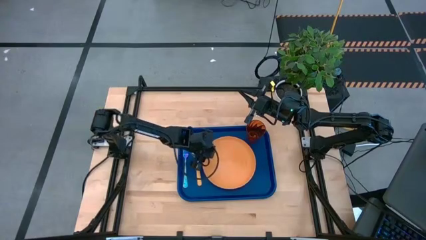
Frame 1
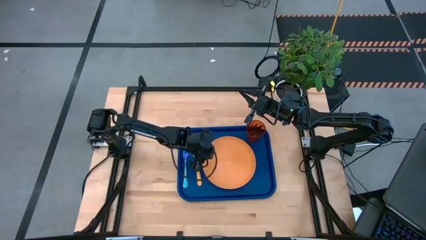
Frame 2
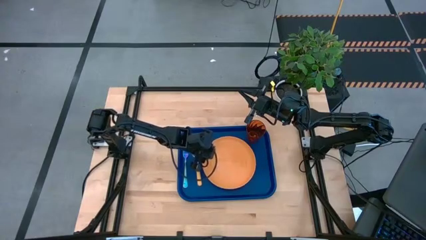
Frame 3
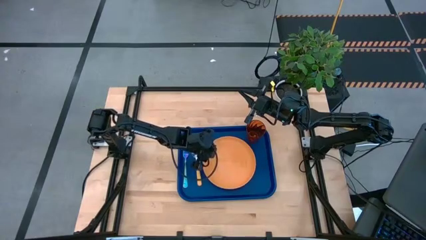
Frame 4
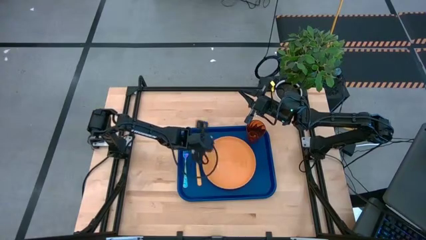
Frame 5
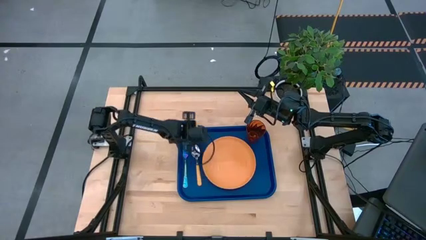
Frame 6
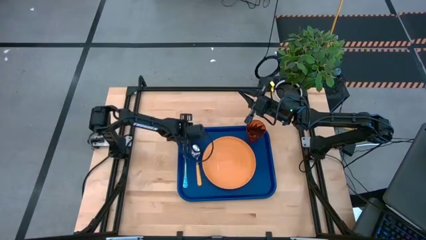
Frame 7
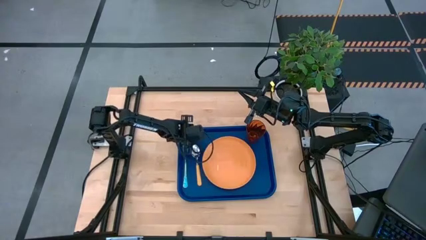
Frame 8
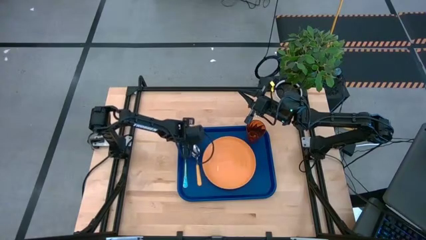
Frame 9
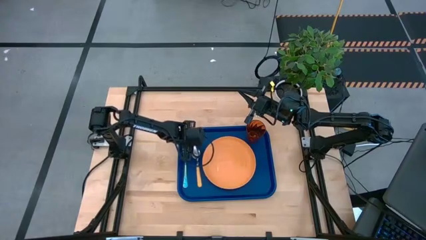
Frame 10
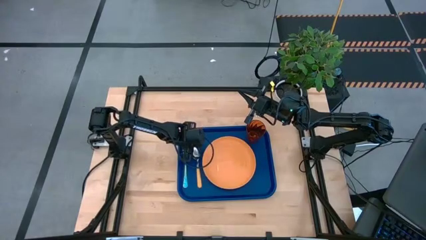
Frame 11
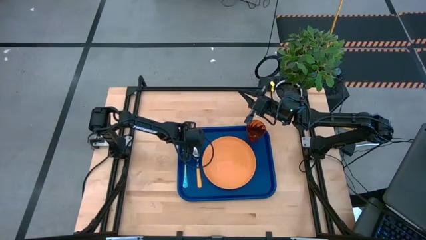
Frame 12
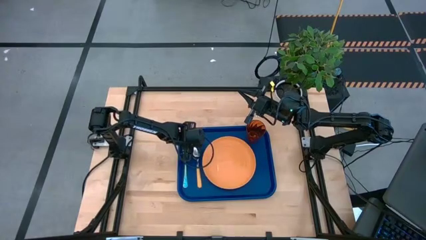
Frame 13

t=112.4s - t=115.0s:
Task: Pick and place plate/cup/fork/spoon on tray
Adjust the orange spoon on the blue tray

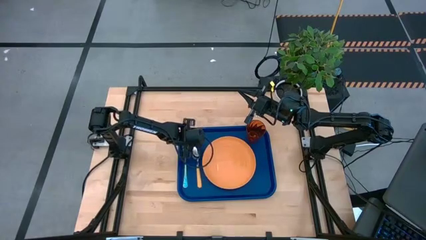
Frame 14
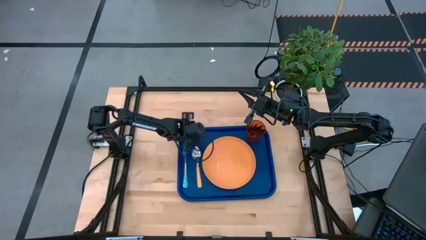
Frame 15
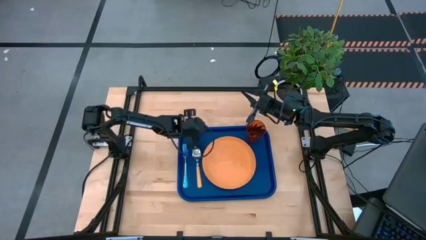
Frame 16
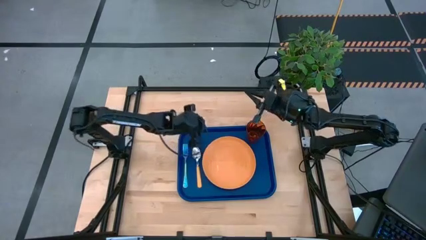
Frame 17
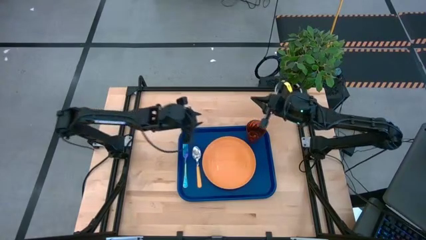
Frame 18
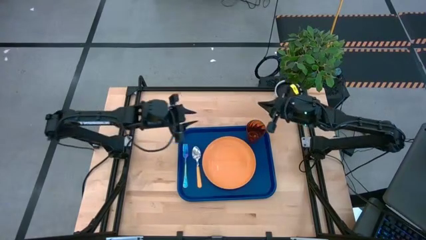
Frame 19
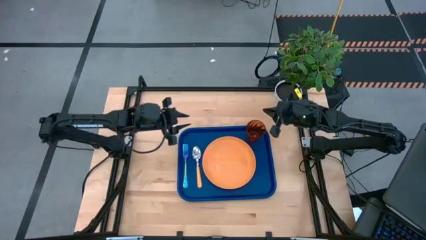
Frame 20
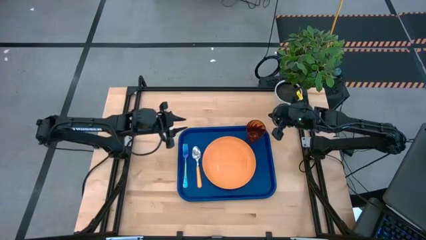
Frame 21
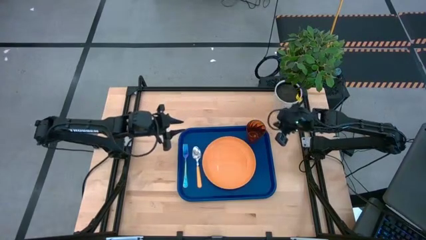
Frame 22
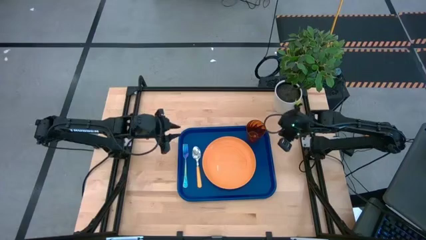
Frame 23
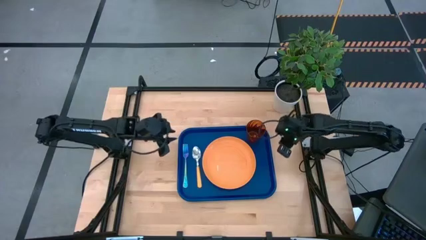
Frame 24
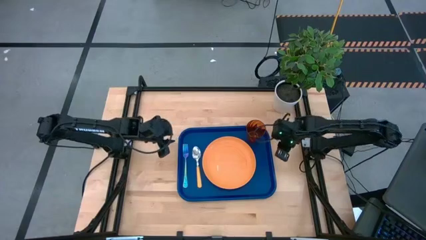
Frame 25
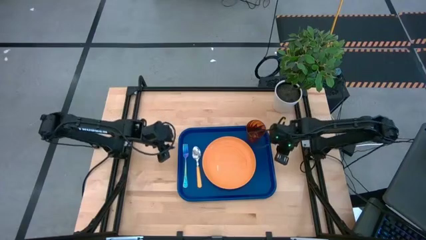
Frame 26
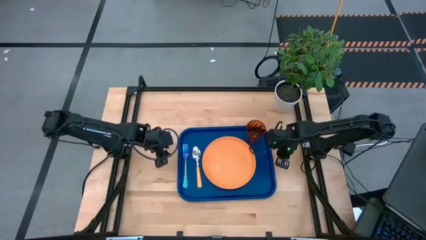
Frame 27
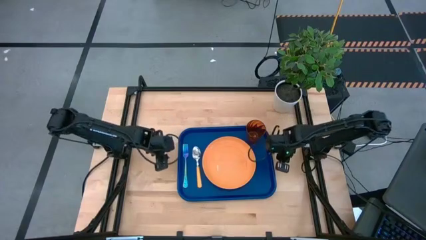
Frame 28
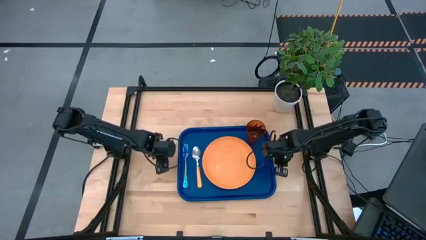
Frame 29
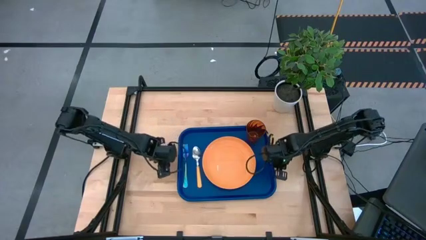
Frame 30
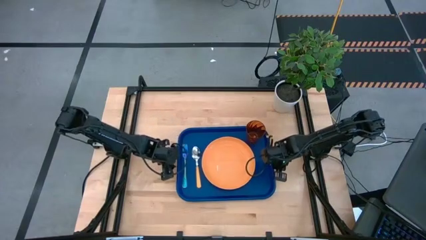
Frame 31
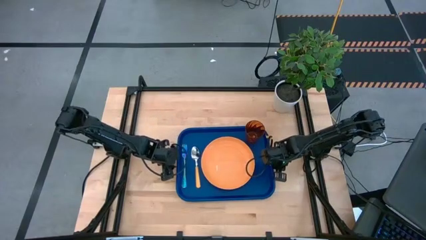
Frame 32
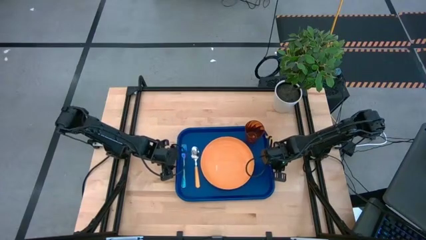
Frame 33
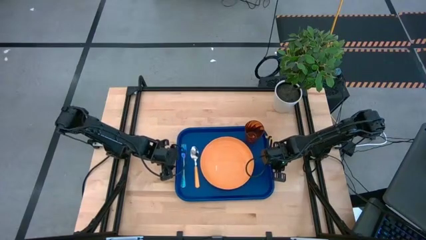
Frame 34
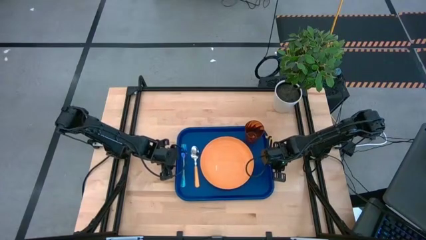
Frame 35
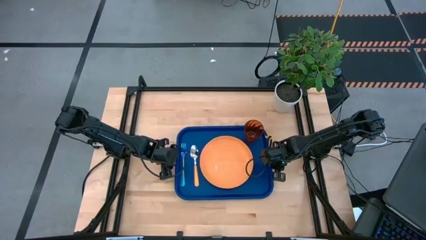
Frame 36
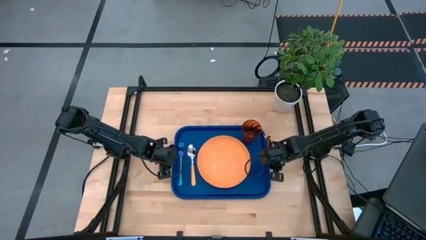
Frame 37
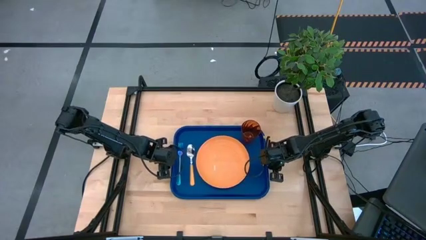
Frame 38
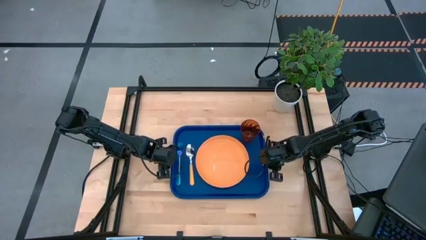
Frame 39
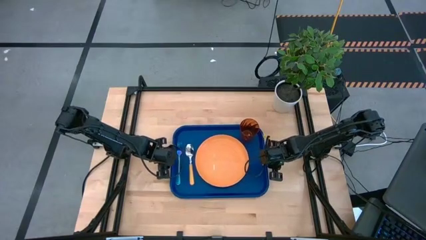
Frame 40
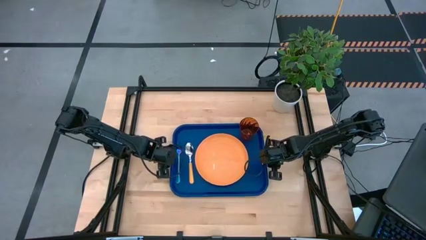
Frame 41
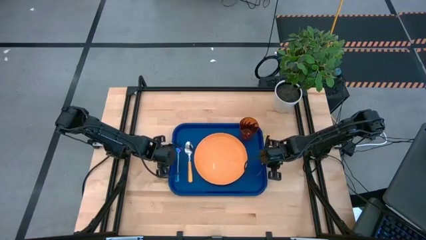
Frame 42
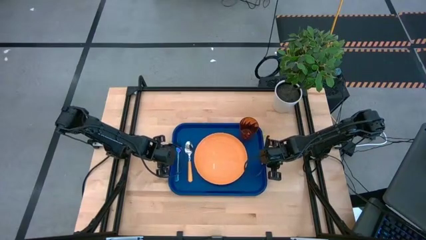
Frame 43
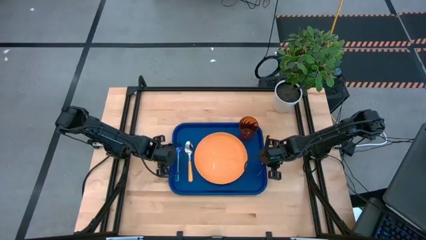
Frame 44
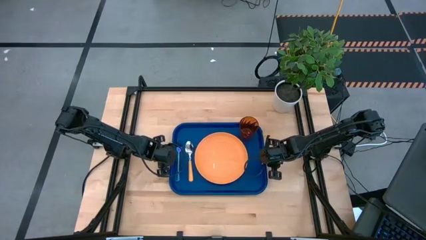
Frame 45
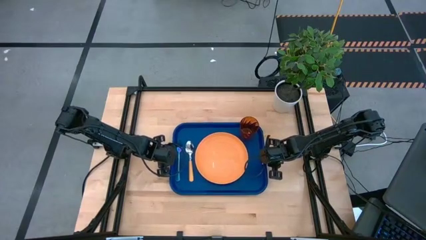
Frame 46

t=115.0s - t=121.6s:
Adjust the blue tray

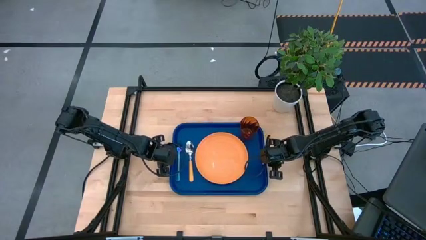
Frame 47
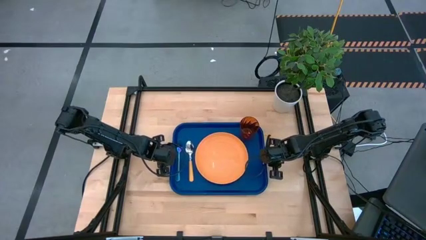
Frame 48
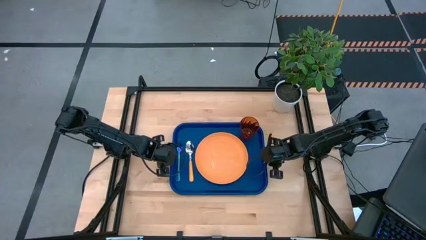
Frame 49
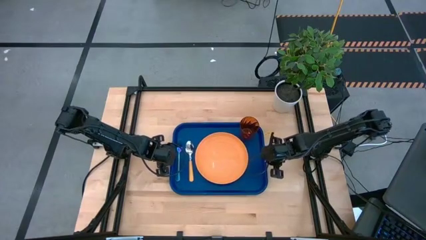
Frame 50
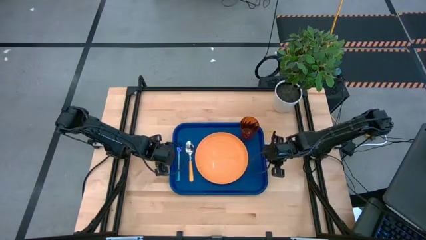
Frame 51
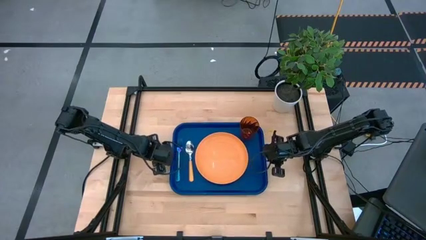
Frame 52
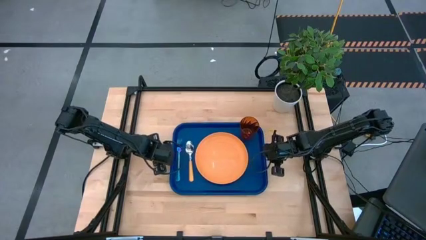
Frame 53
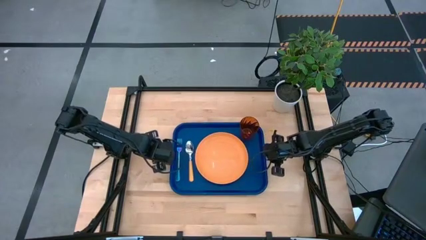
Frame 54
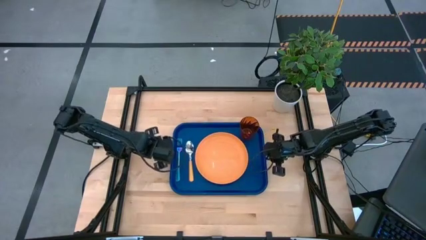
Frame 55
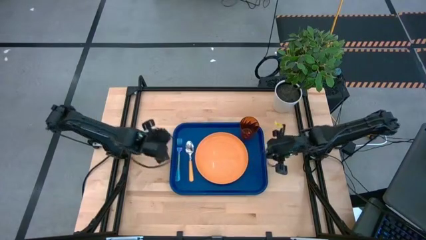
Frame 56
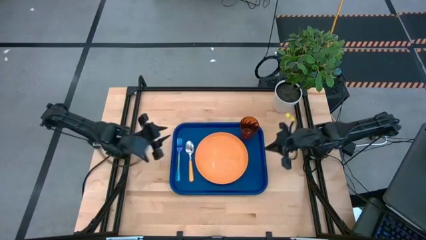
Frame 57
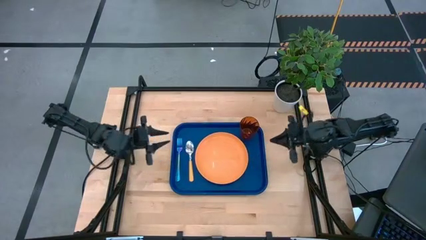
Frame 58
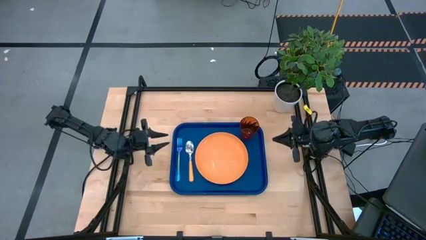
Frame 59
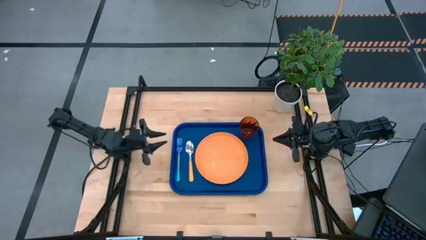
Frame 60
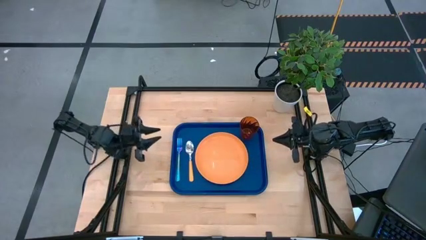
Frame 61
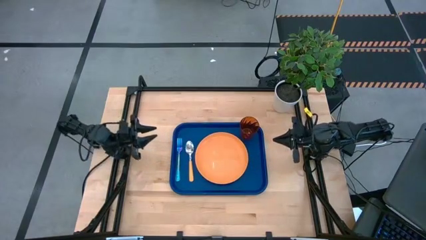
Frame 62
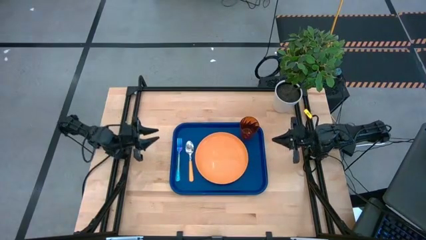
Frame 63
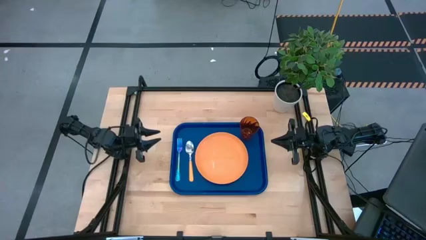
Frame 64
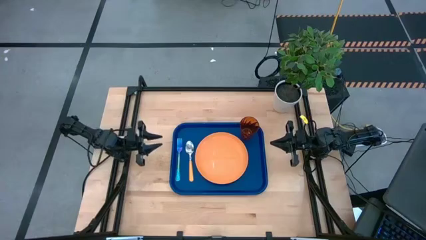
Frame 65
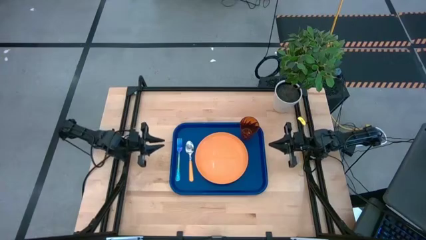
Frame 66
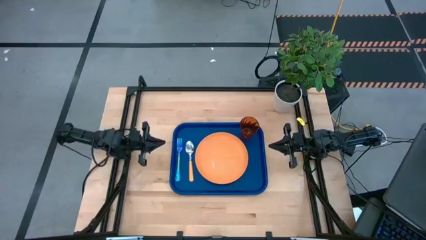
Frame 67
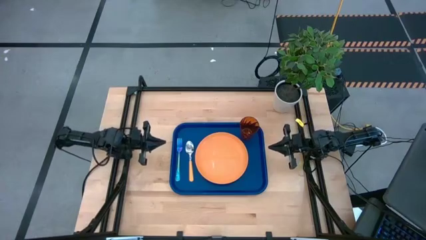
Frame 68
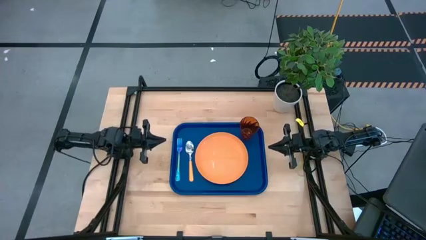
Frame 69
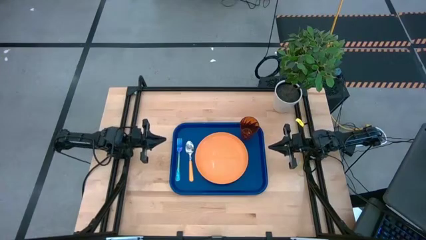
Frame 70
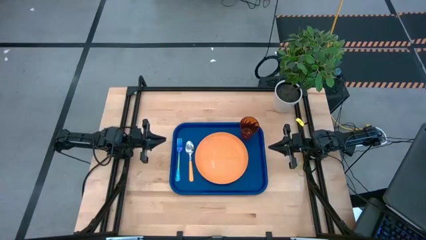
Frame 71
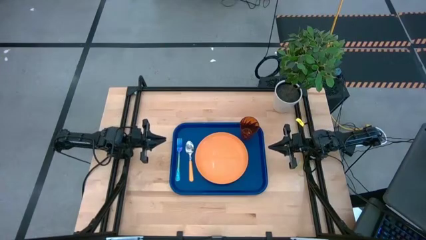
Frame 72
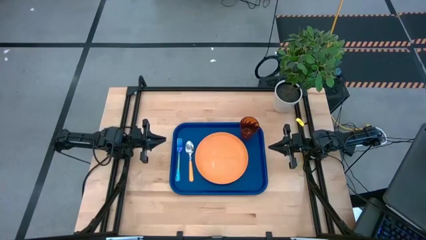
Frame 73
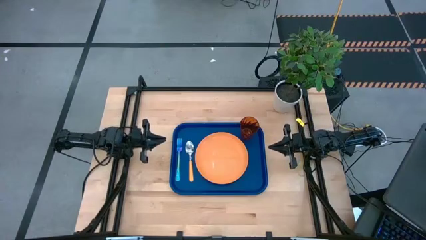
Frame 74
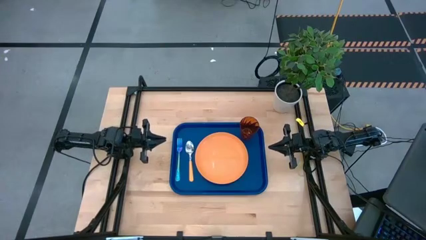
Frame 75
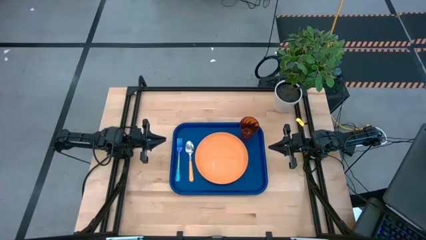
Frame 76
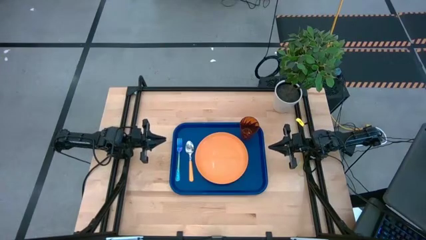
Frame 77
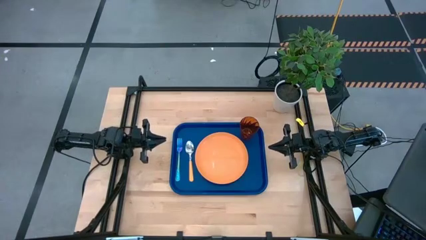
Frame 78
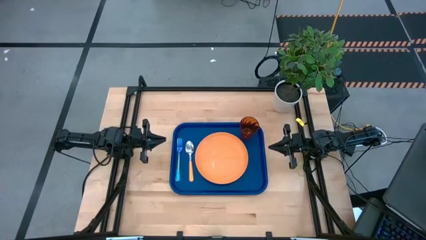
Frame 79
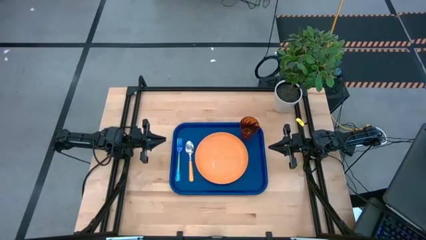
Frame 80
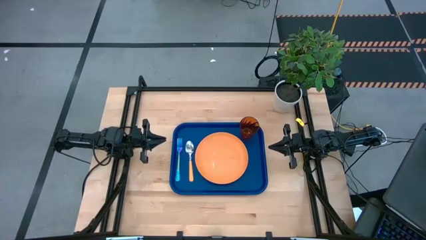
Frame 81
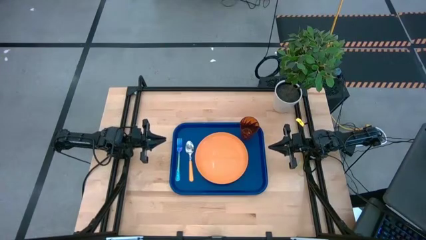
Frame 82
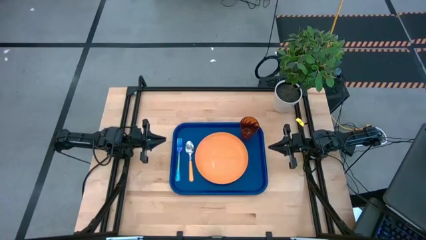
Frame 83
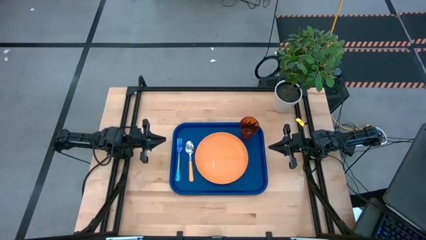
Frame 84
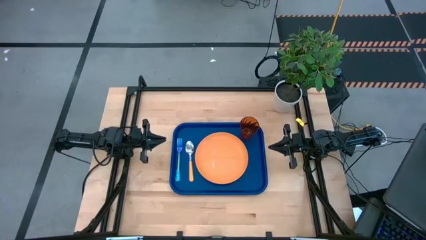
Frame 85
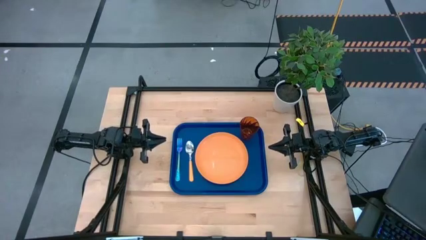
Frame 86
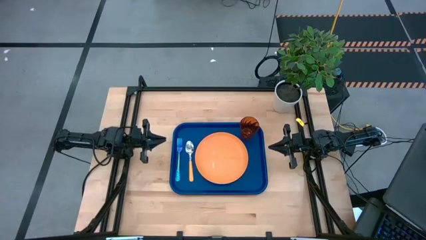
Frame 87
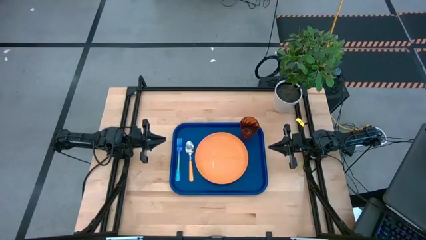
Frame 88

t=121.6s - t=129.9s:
Return to Home Position
